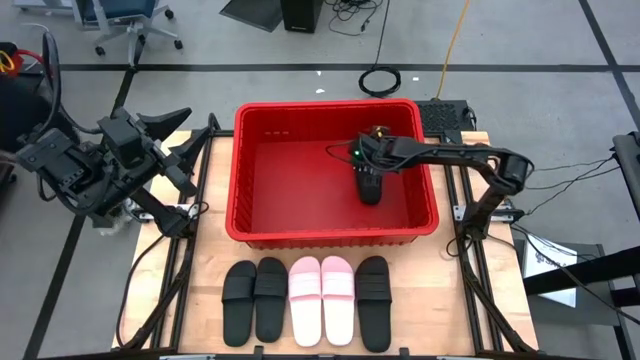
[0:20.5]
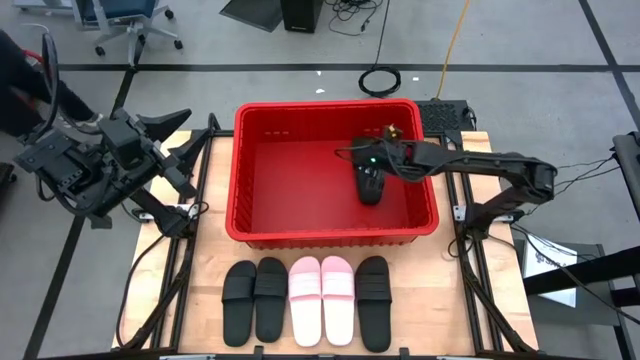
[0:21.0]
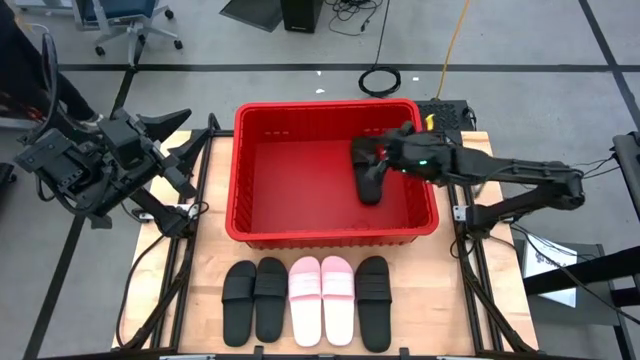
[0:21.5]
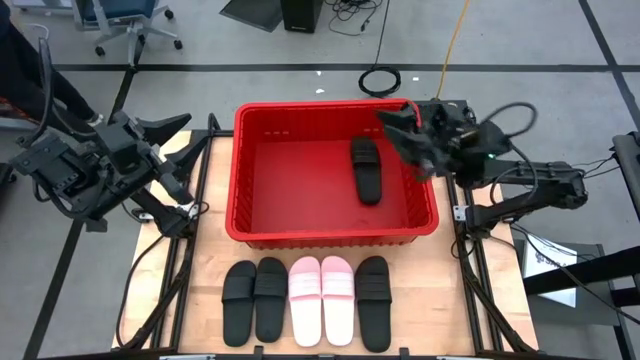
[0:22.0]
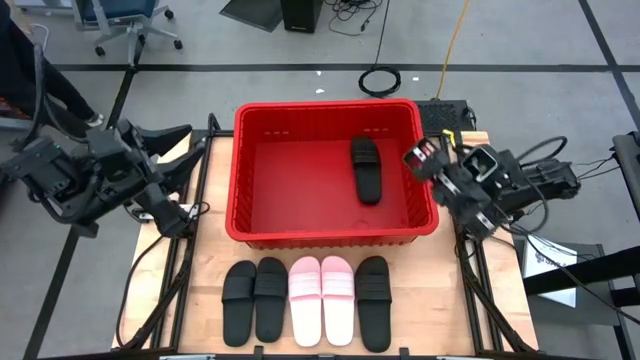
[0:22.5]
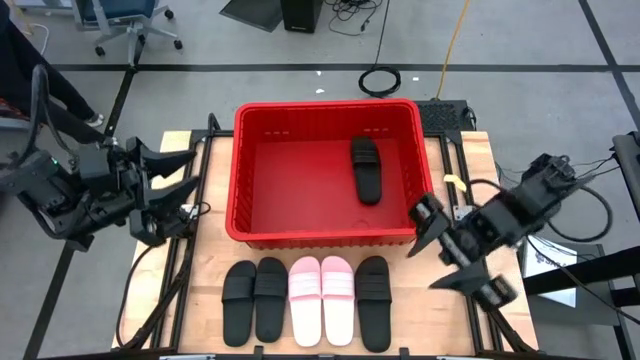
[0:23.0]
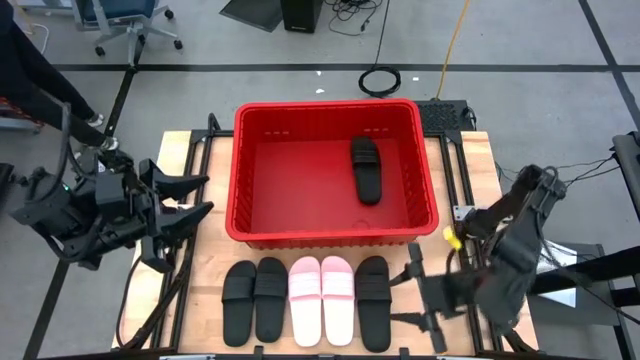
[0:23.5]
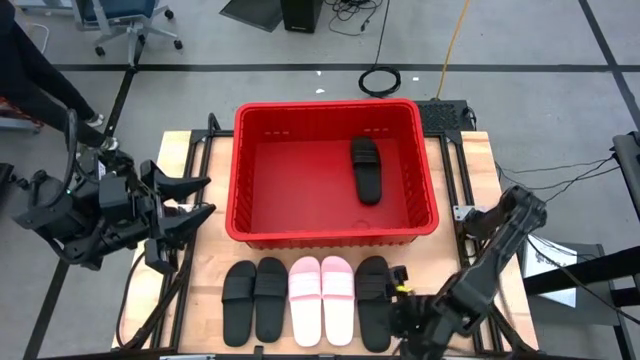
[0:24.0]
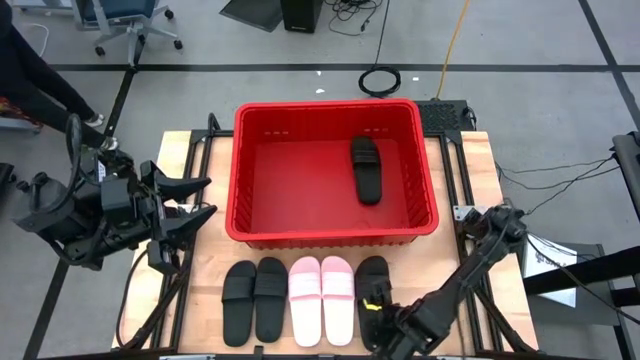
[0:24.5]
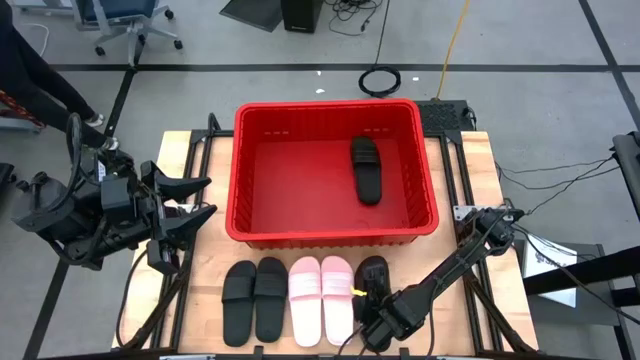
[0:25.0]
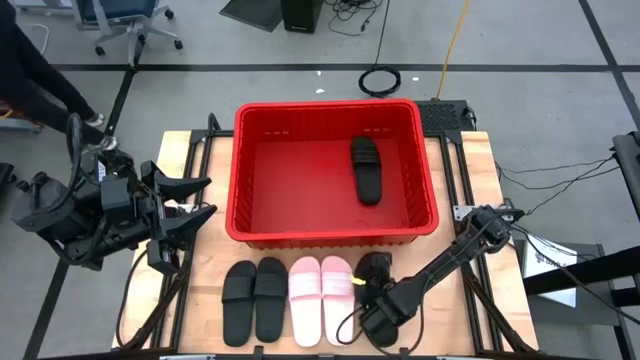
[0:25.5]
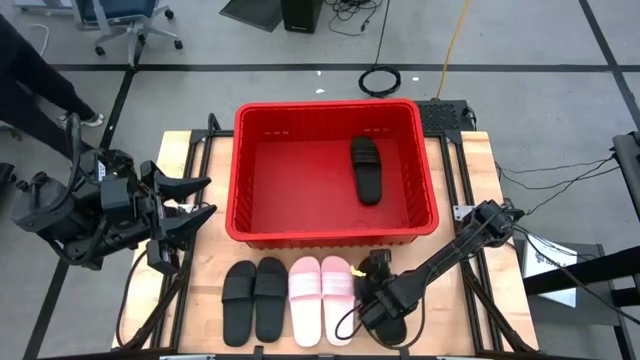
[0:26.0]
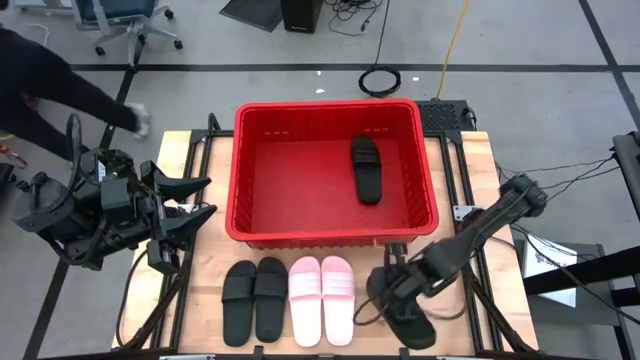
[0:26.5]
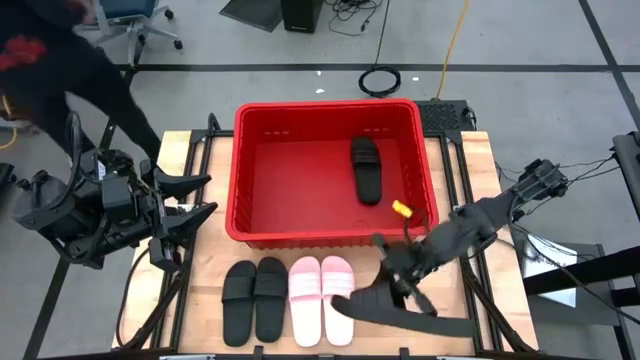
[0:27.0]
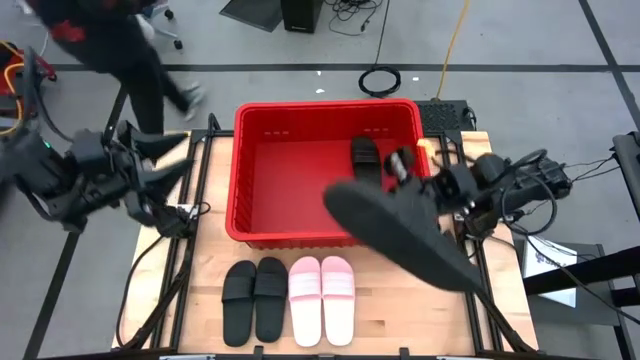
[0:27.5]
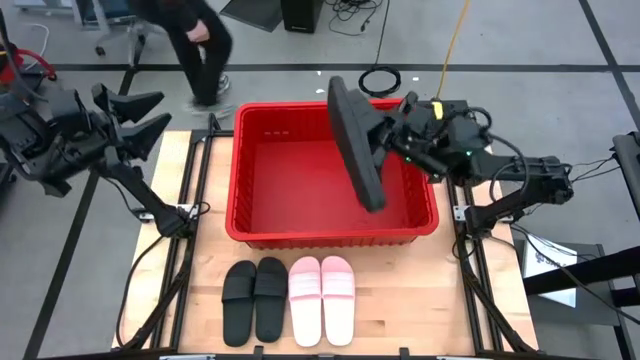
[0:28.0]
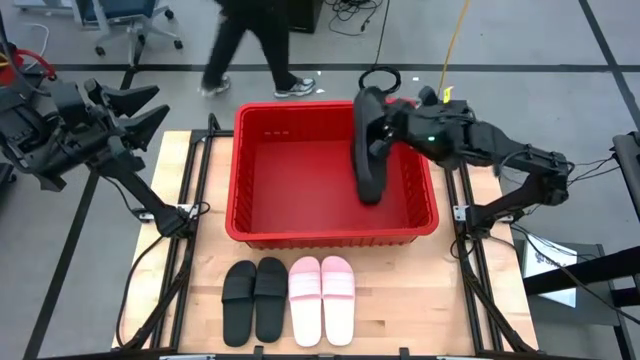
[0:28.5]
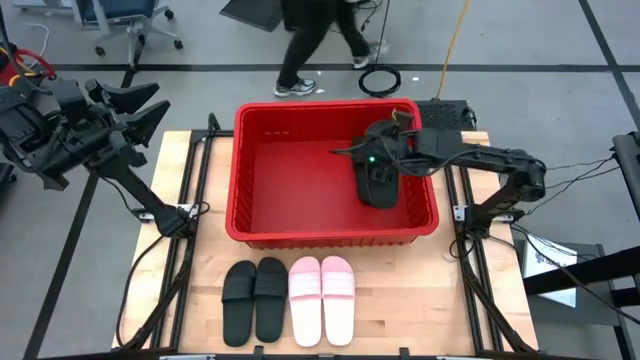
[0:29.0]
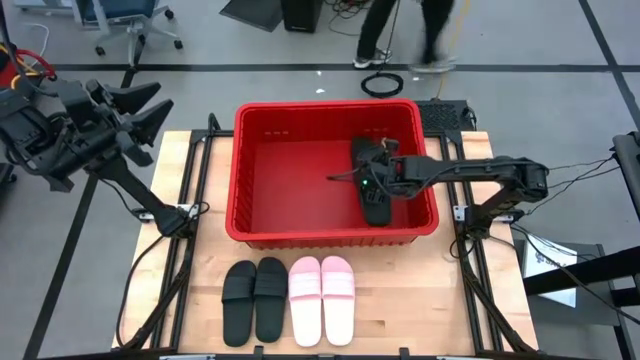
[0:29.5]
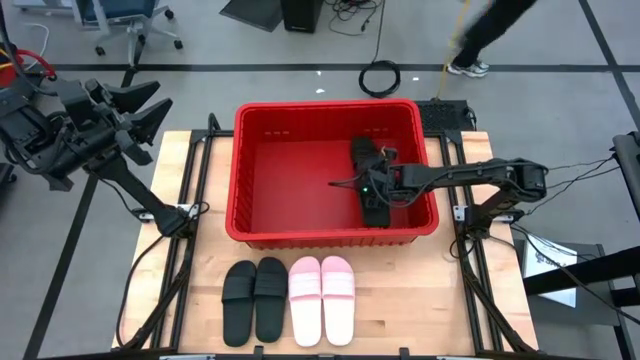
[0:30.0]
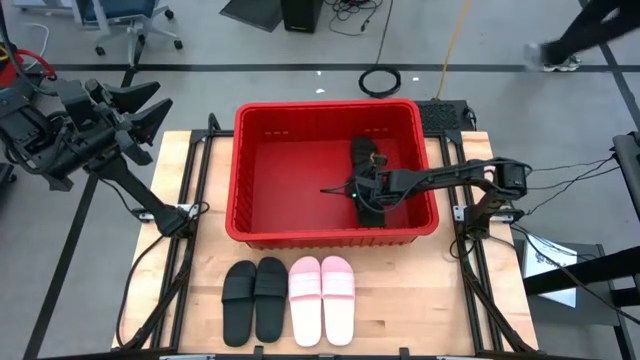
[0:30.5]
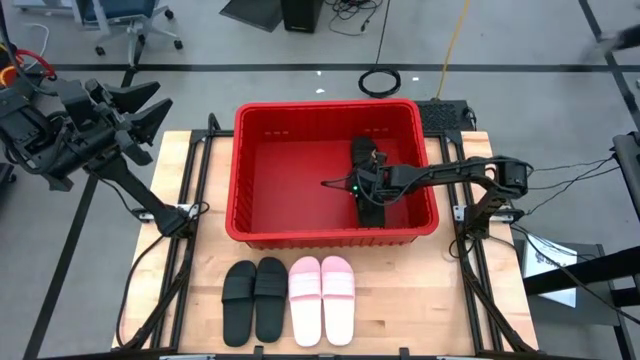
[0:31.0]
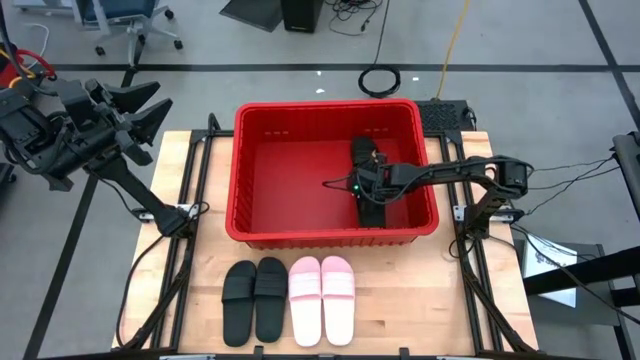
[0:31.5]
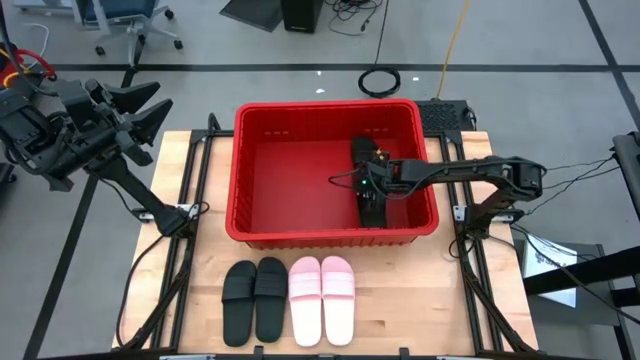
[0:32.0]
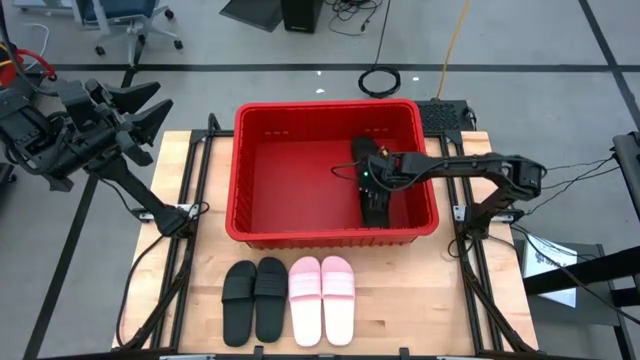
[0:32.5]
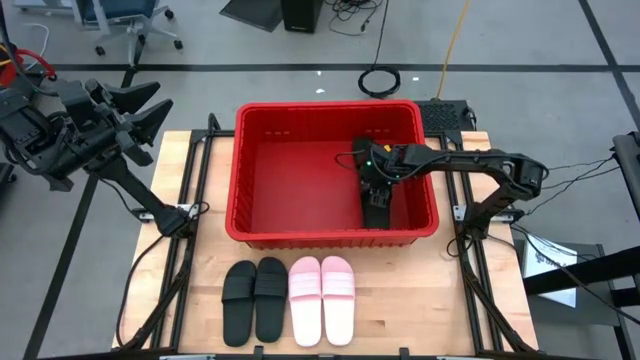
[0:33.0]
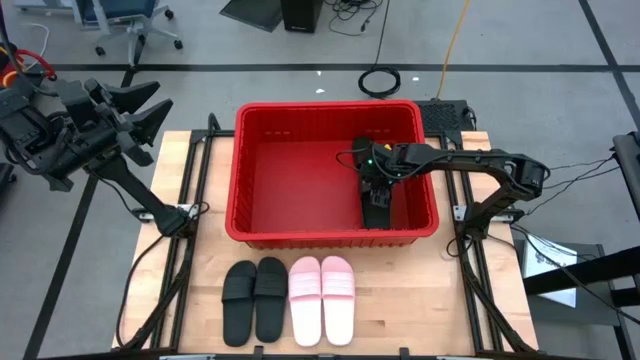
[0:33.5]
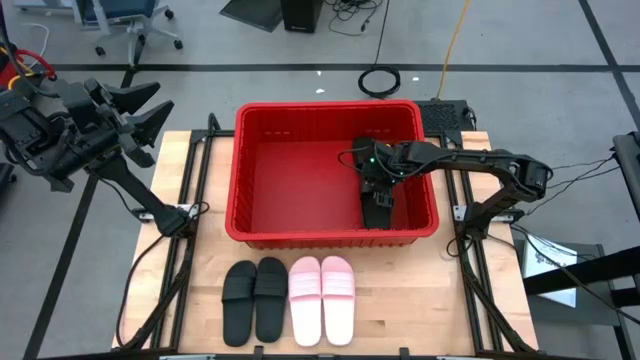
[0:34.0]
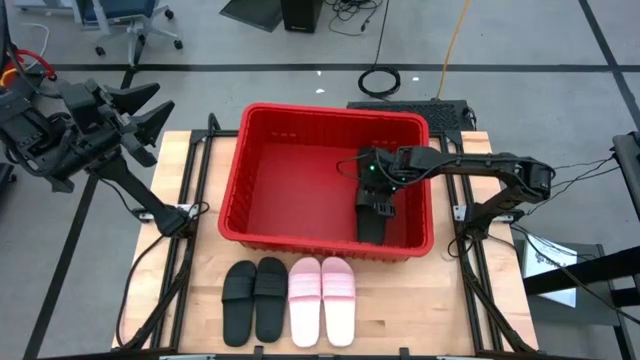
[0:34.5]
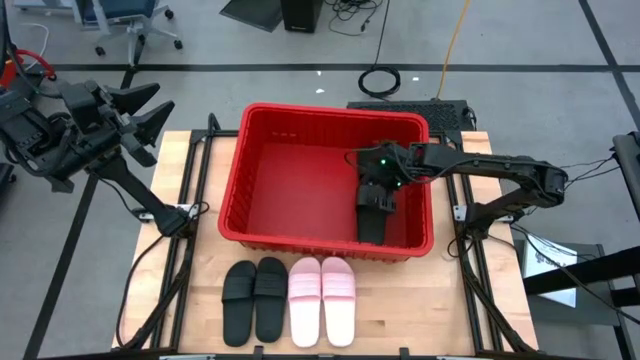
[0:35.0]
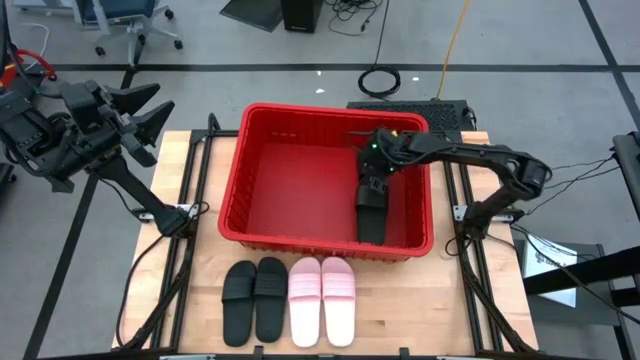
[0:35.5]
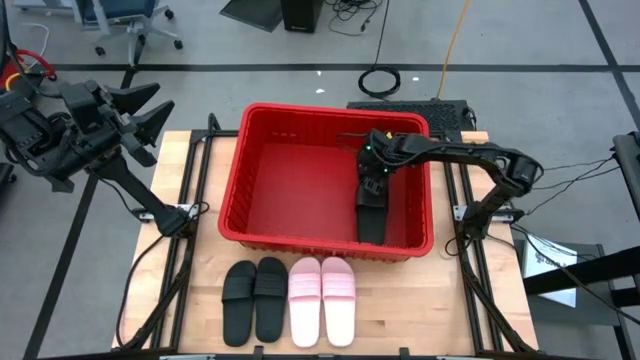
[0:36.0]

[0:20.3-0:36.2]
Task: Pick and place slides into bin
Put the black slipper into the red container

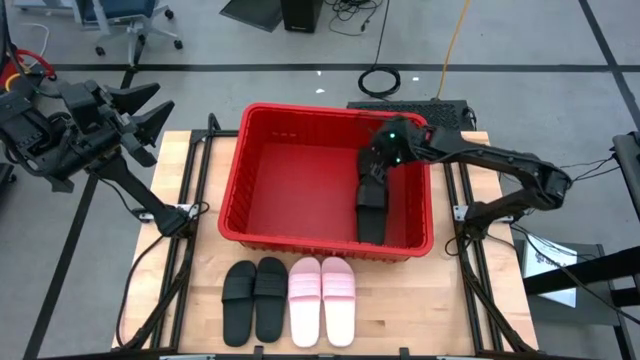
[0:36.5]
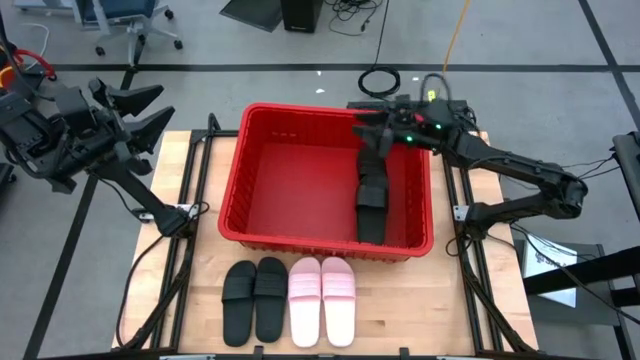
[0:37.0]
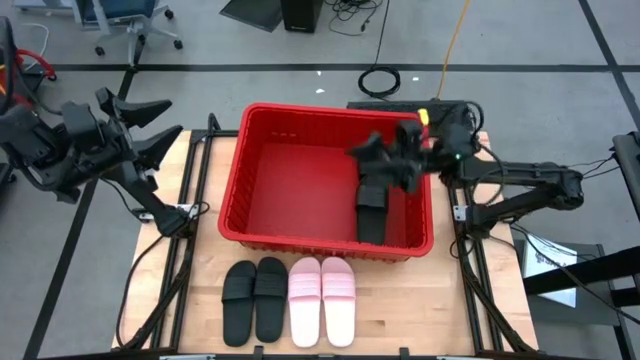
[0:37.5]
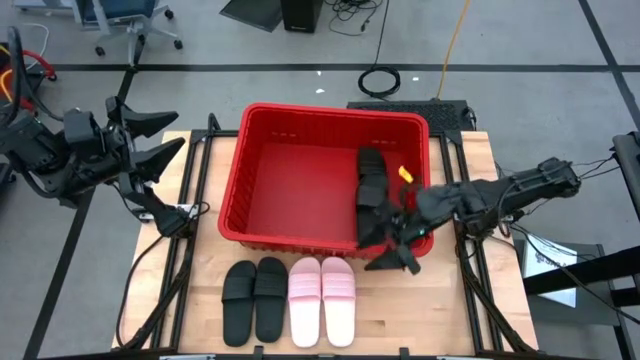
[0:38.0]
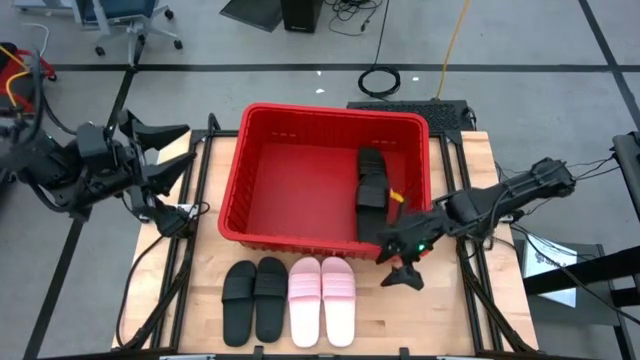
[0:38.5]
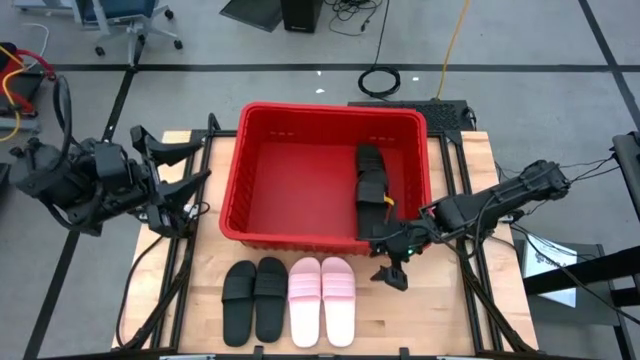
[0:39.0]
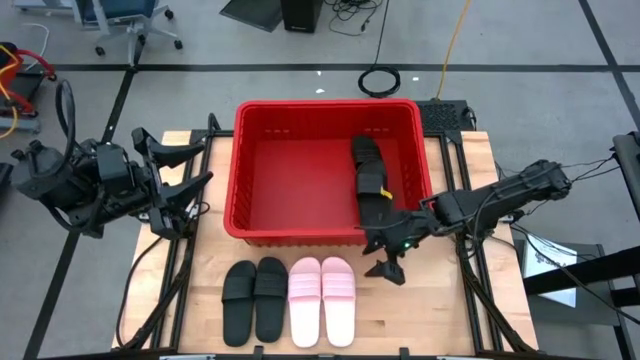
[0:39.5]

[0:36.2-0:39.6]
Adjust the red container

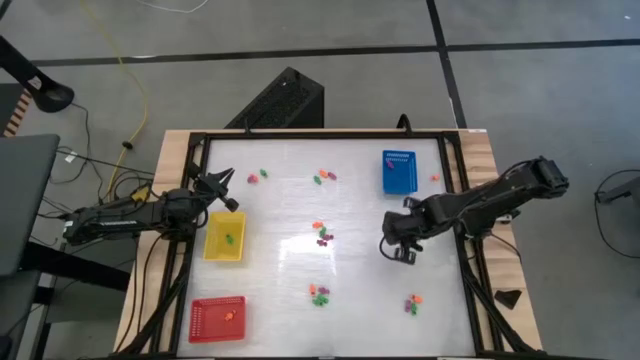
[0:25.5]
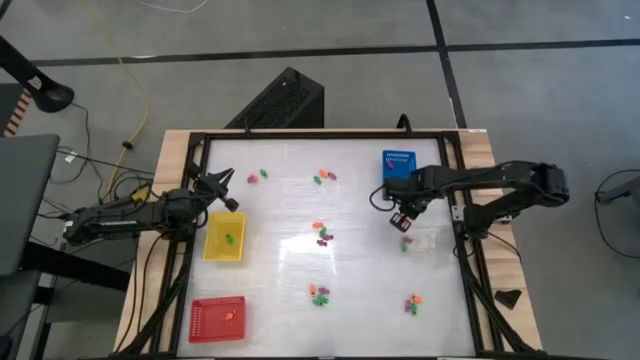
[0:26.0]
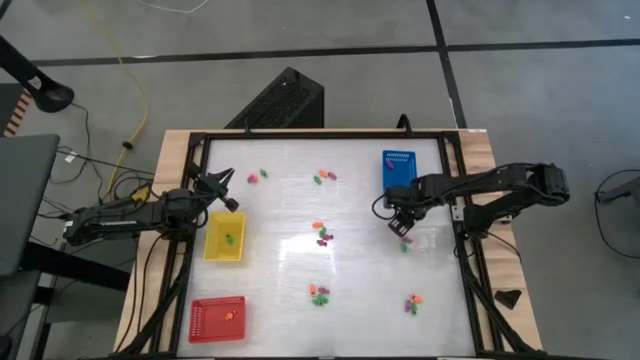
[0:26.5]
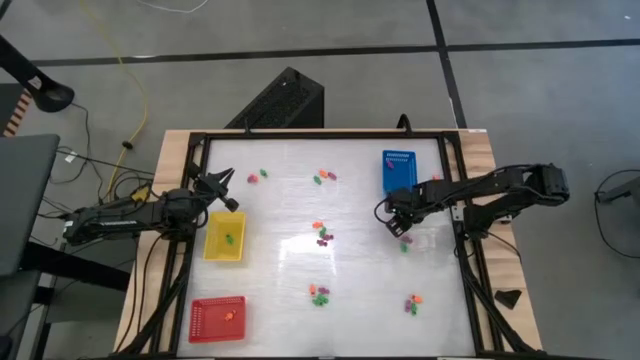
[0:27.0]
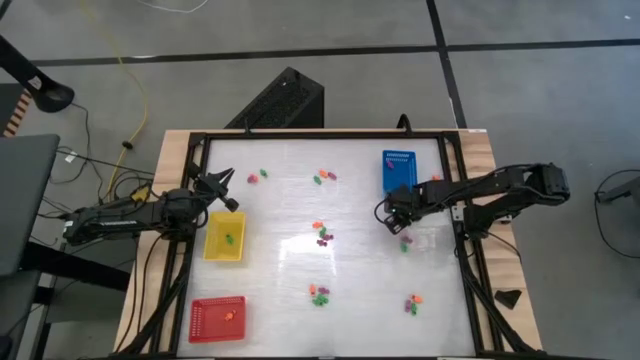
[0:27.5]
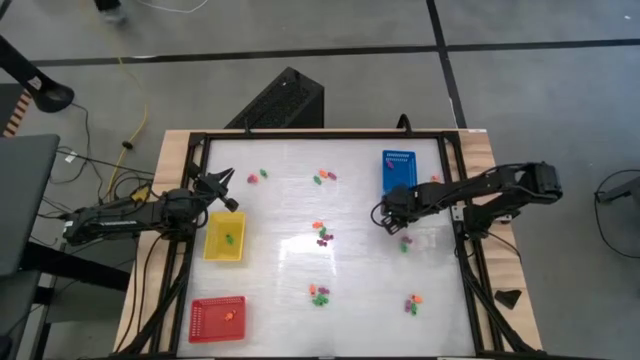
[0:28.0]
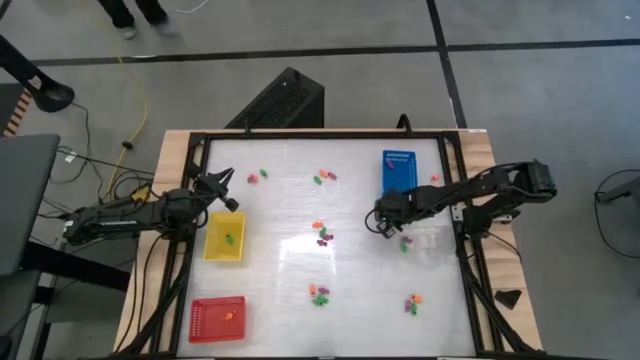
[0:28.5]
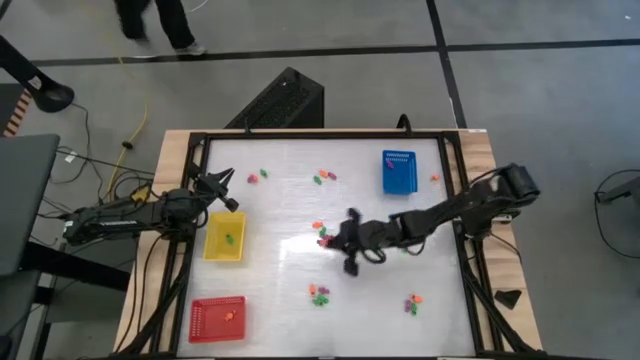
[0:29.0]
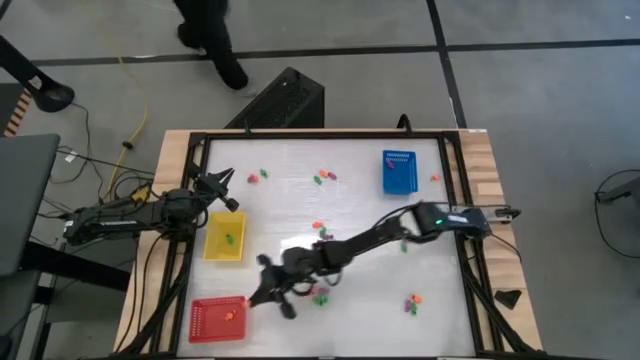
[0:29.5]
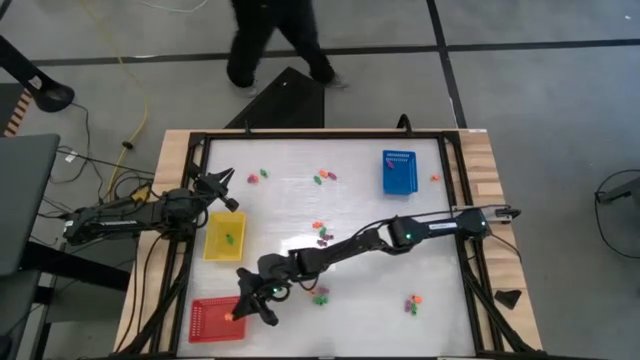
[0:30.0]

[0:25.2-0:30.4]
Task: Sort Halloween decoration
Put the orange skeleton toy into the red bin
